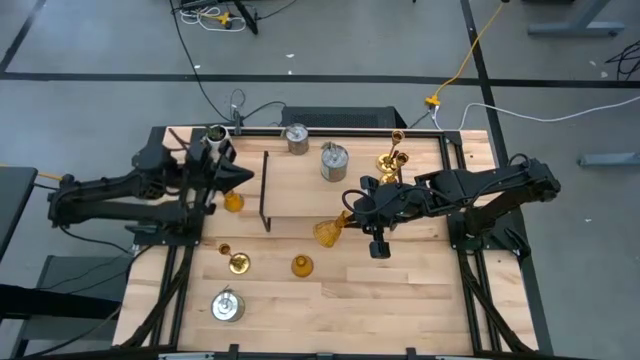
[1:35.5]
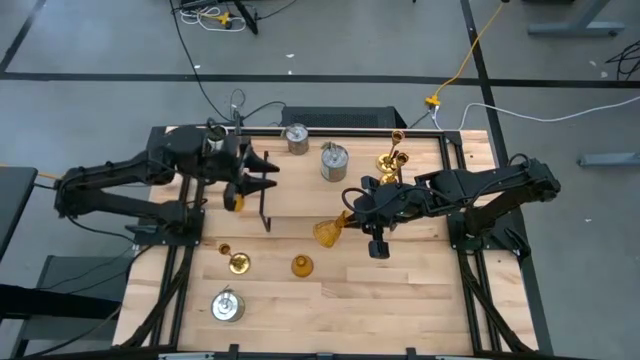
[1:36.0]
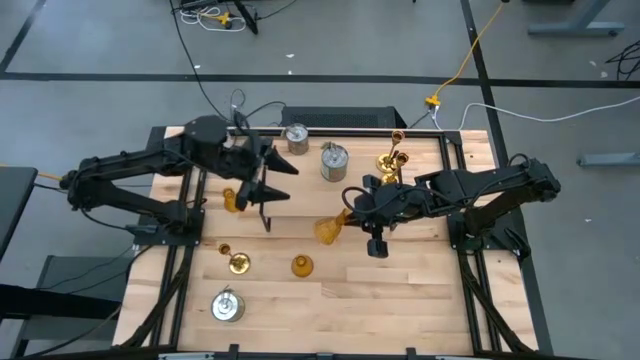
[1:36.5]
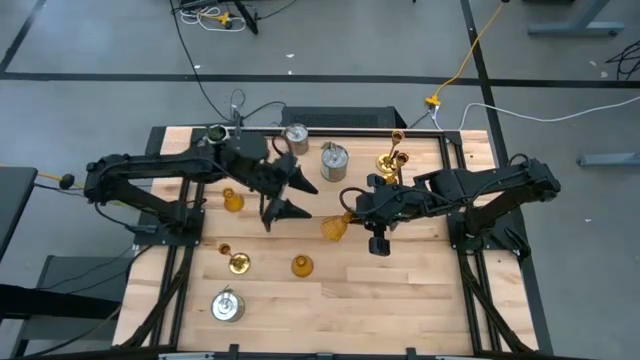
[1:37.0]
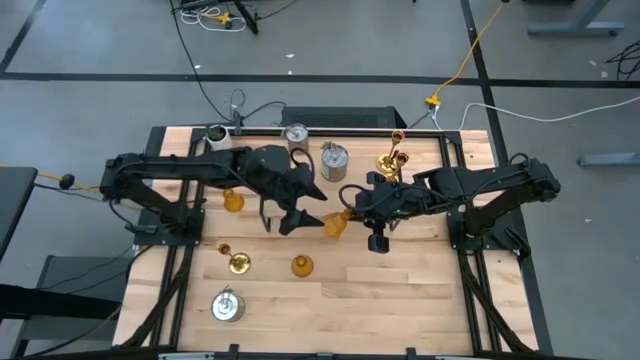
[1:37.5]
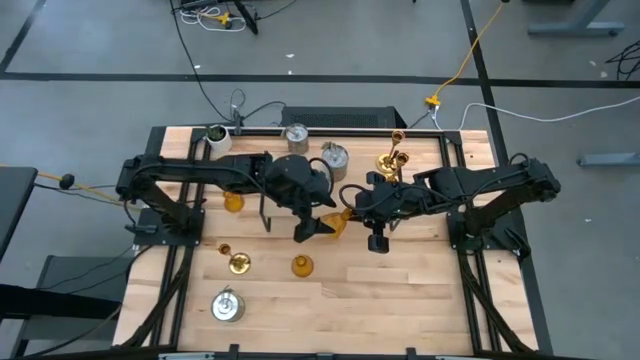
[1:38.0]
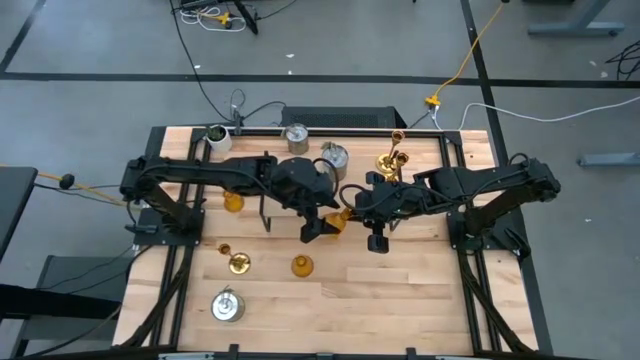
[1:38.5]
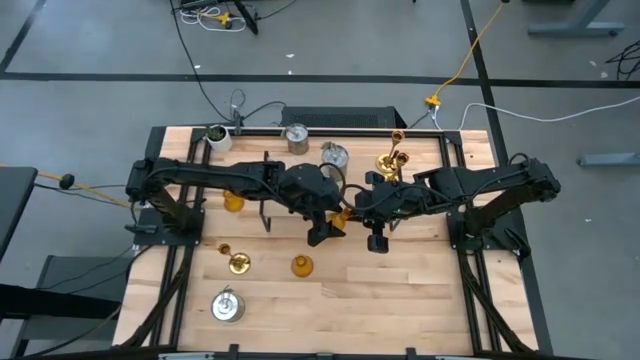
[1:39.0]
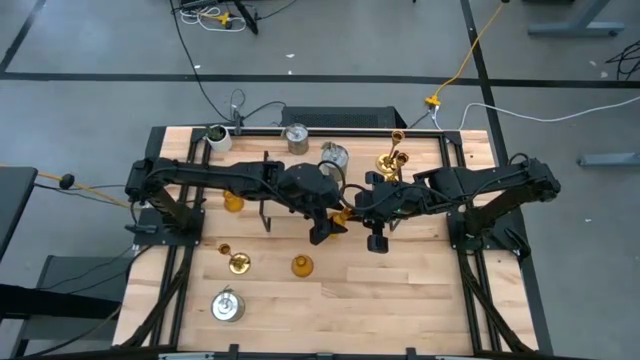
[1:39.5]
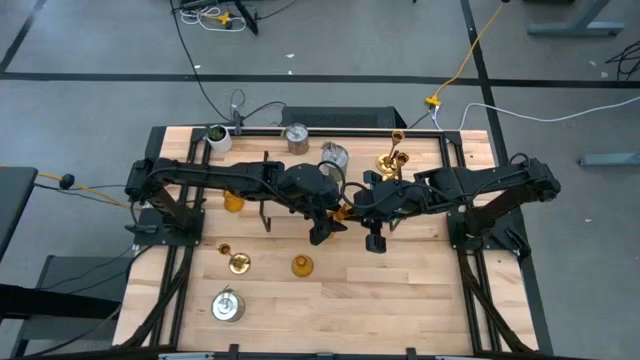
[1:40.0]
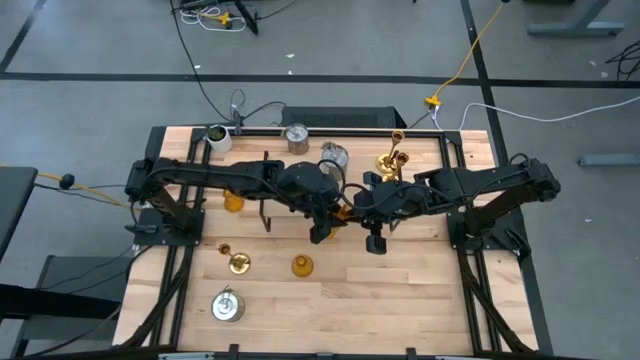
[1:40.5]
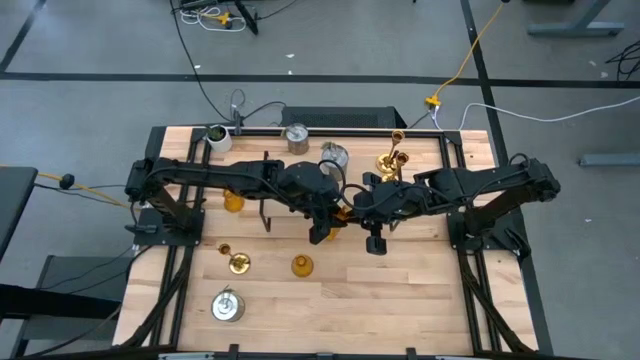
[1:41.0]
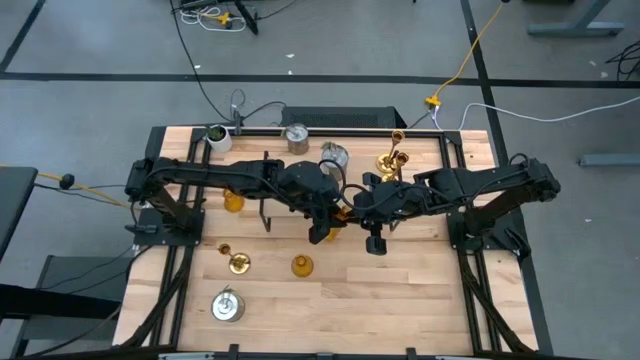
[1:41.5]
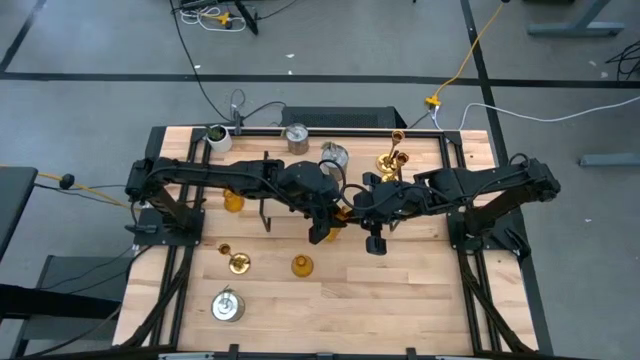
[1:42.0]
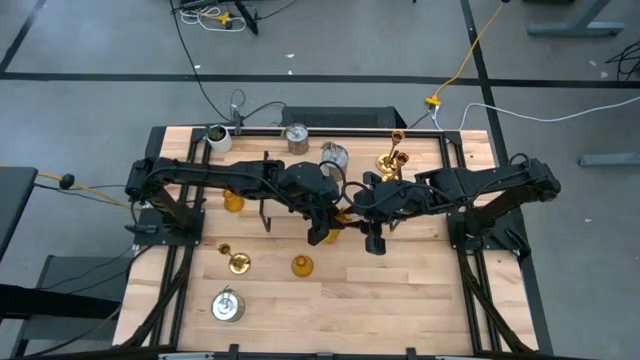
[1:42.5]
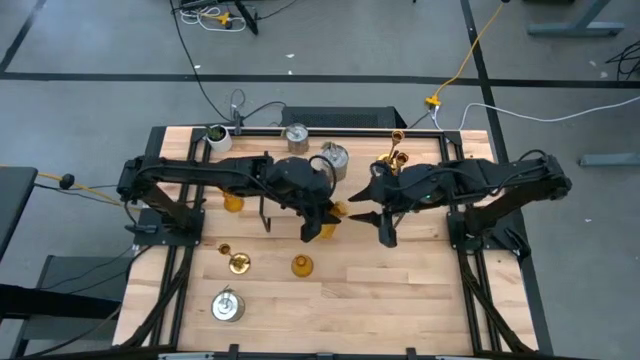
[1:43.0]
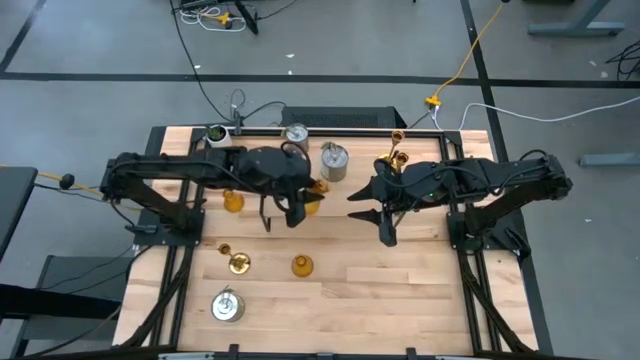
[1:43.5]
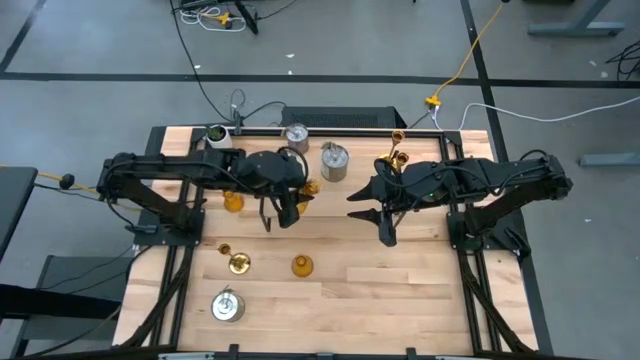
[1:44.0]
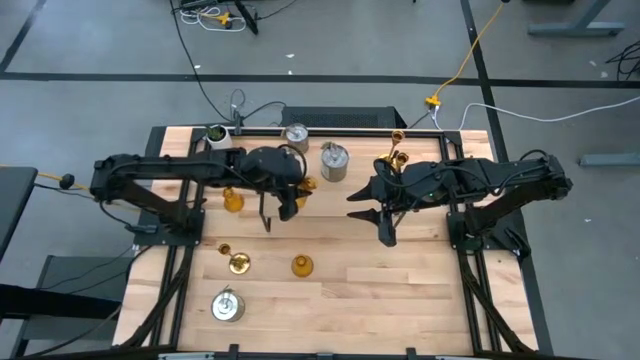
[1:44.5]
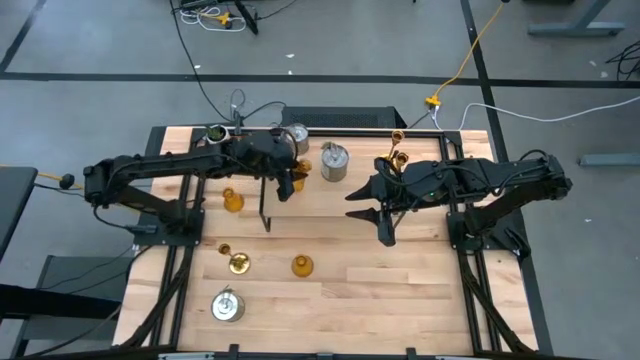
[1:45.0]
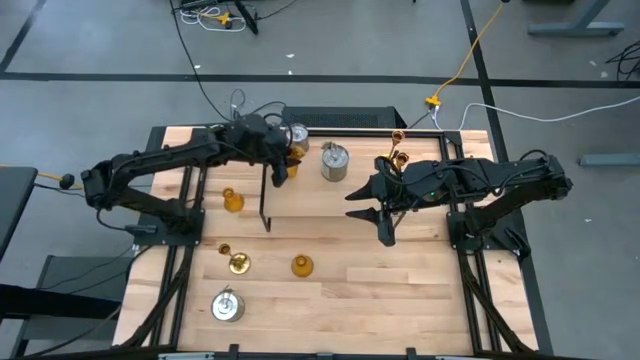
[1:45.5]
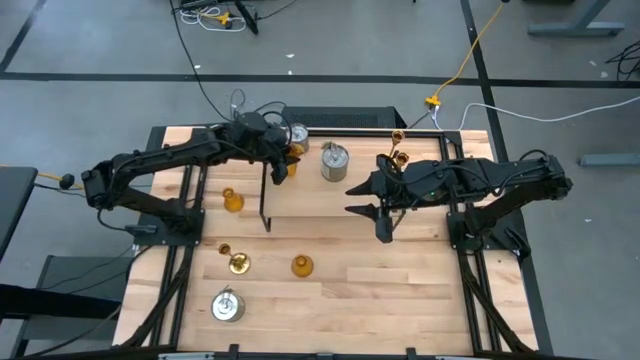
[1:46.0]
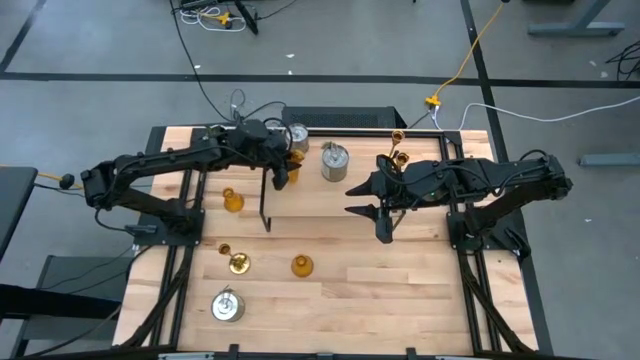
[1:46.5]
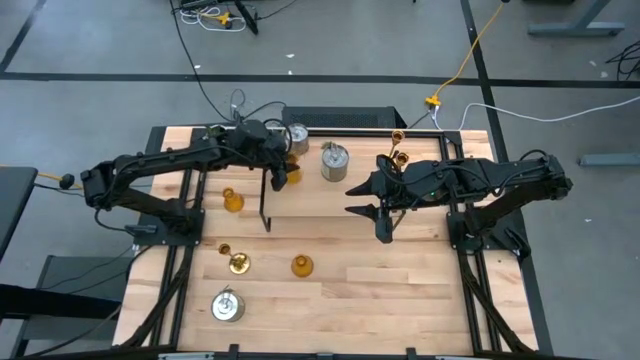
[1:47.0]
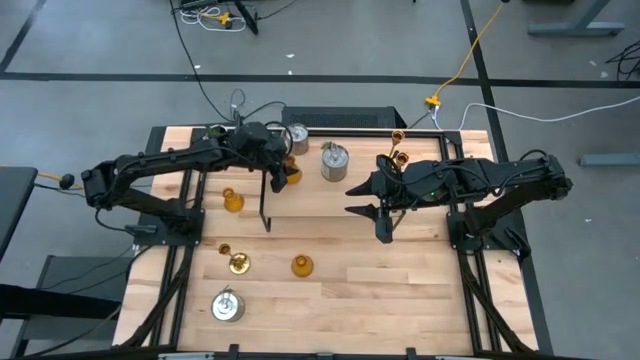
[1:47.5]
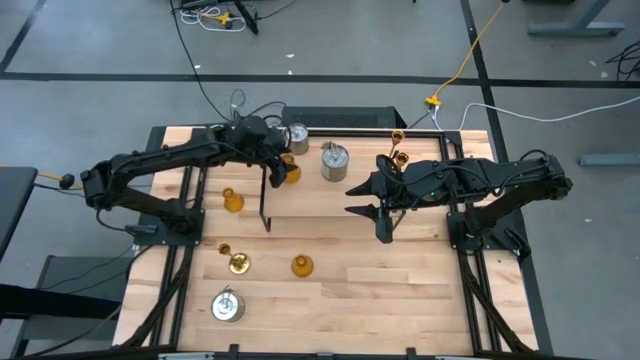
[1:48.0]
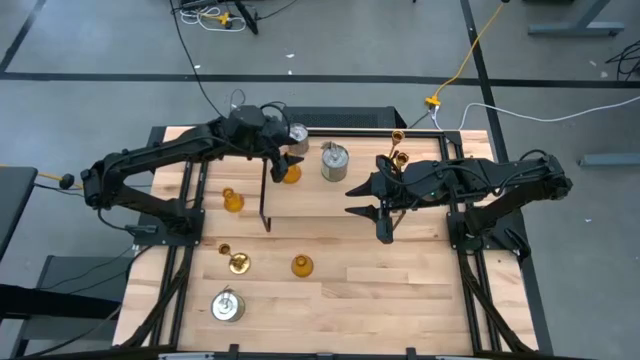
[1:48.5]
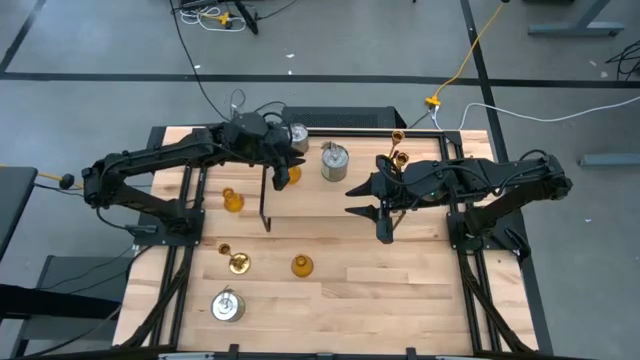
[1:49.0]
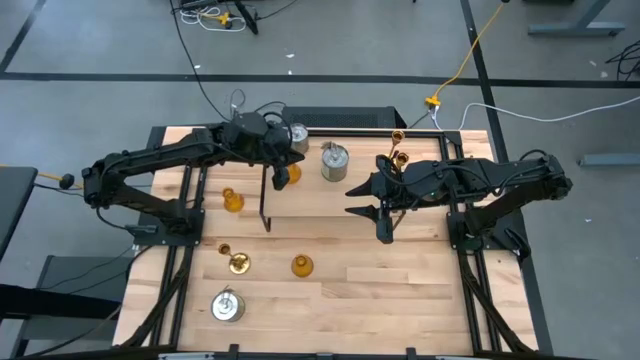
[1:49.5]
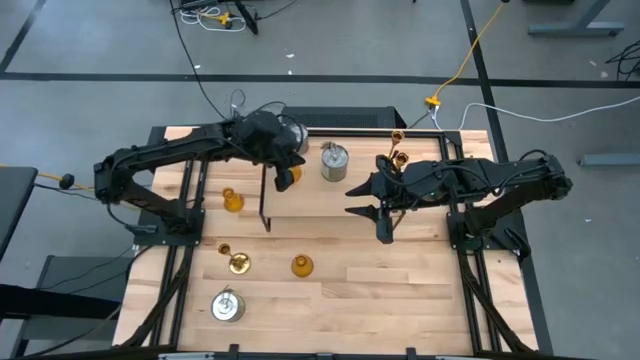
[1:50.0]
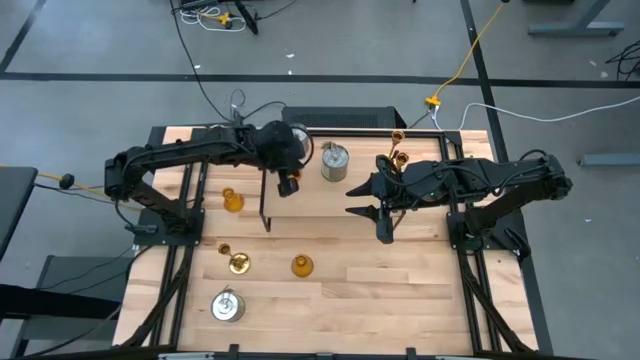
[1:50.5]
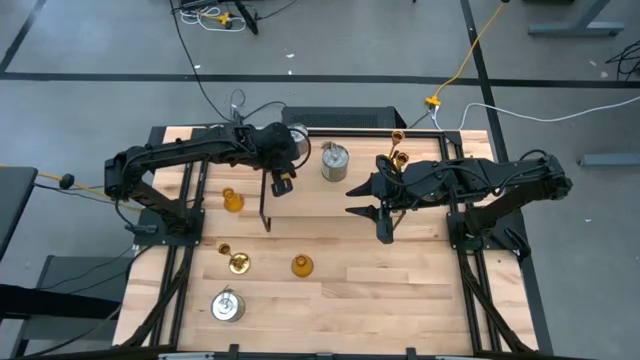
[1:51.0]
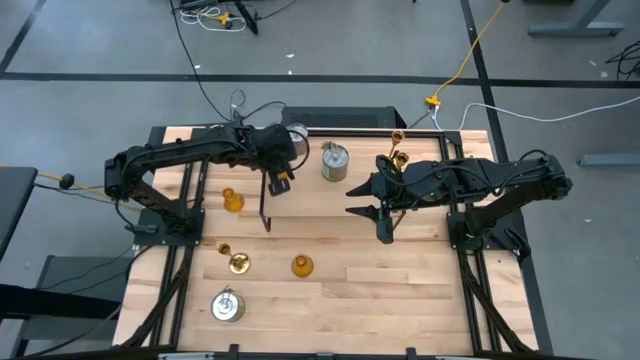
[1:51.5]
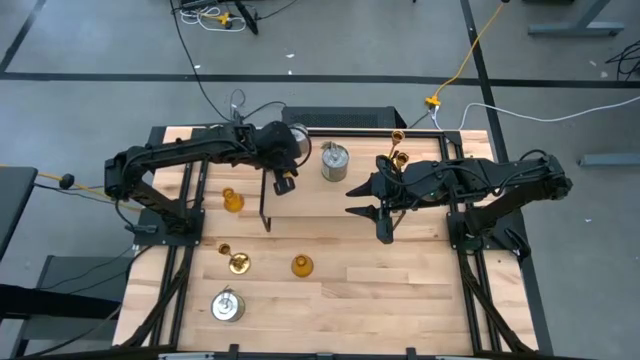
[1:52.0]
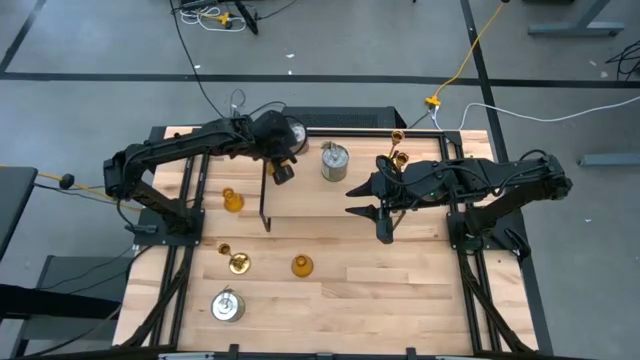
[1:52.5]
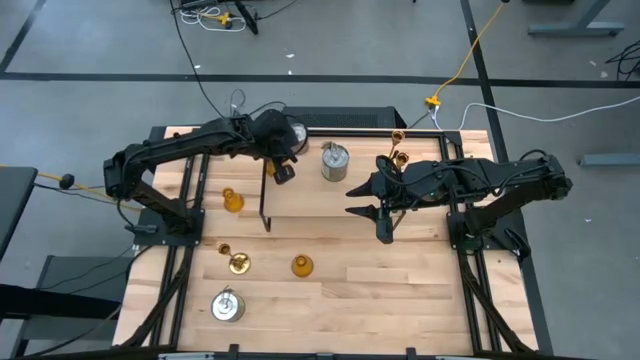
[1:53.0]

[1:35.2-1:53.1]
Task: Pick & Place candle stick holders
Put the top glass candle holder on the shelf

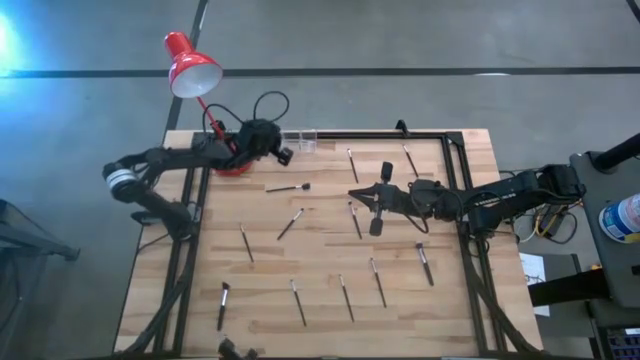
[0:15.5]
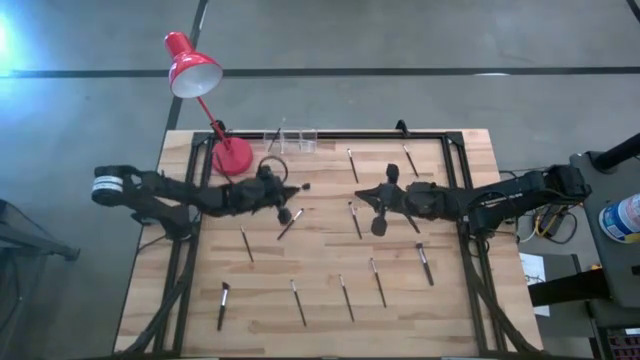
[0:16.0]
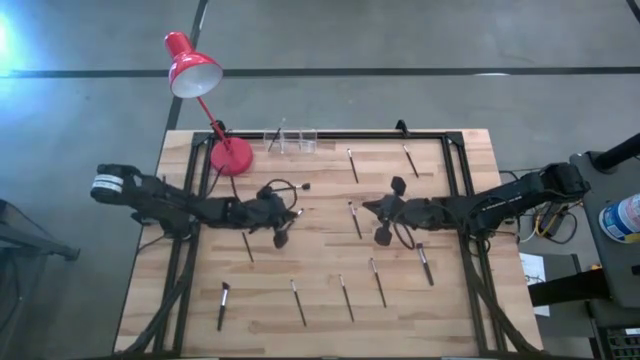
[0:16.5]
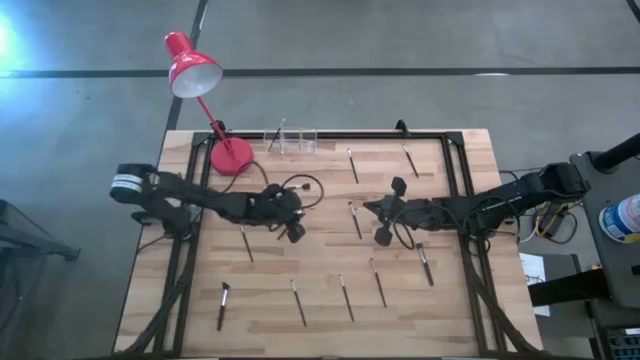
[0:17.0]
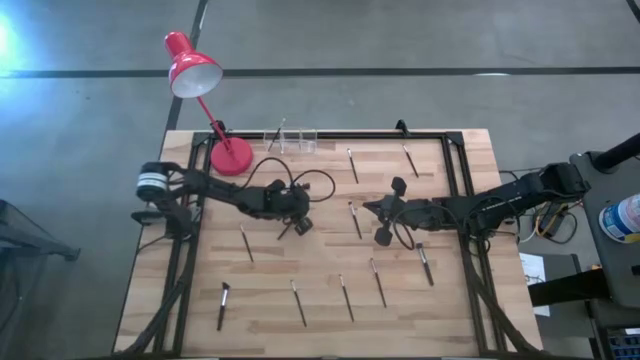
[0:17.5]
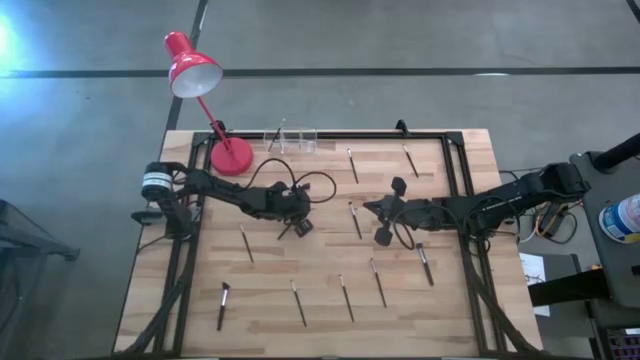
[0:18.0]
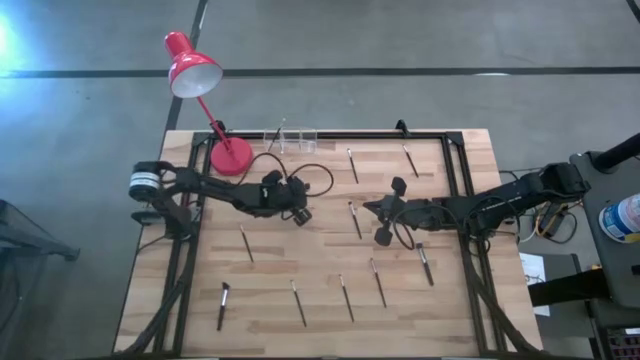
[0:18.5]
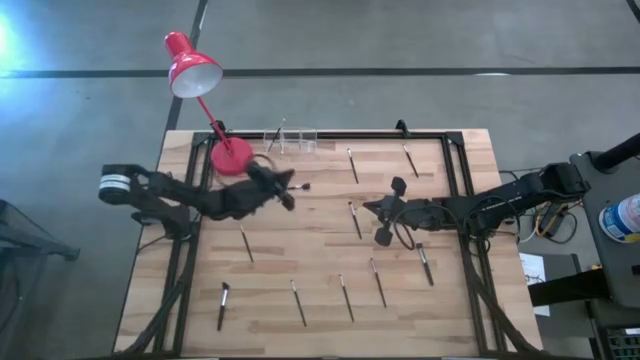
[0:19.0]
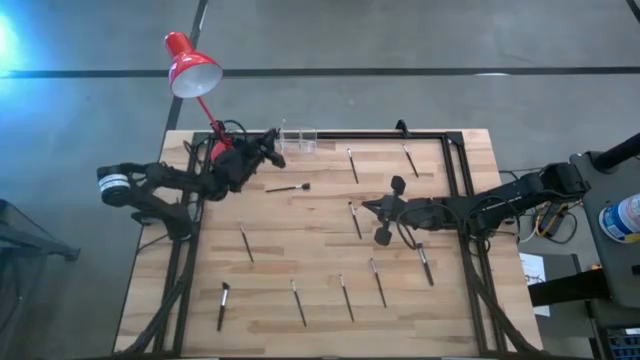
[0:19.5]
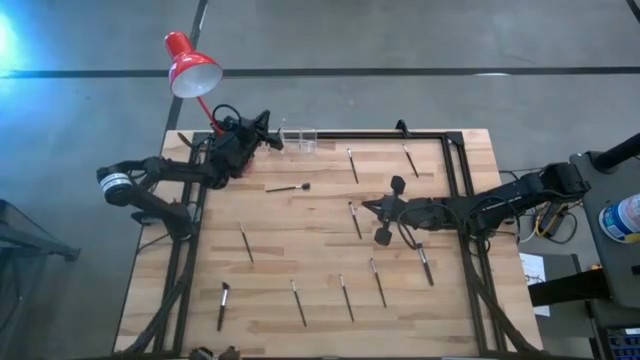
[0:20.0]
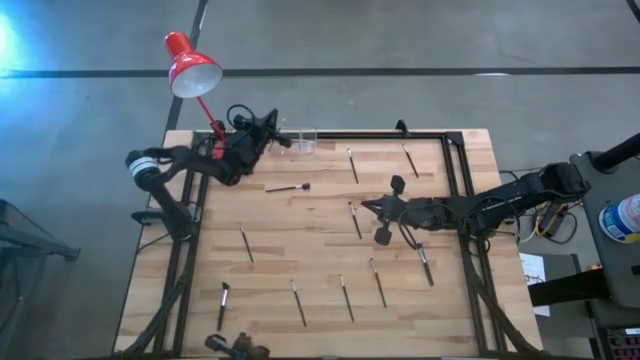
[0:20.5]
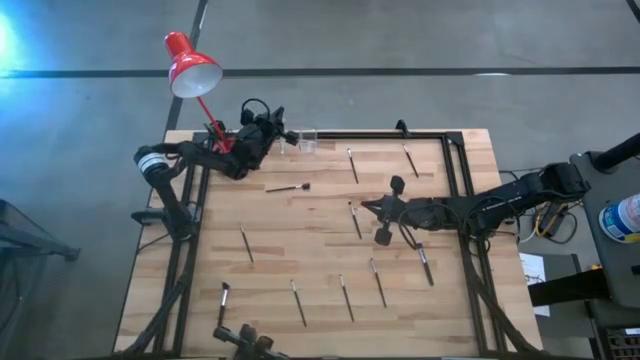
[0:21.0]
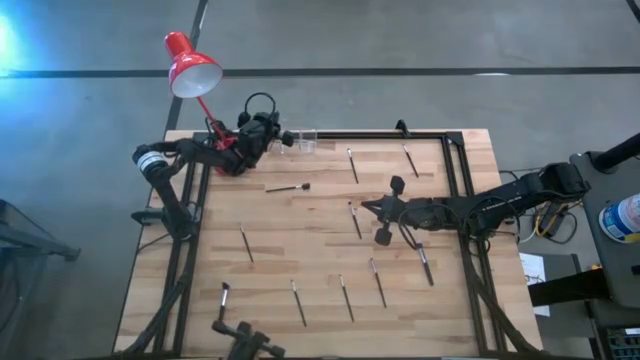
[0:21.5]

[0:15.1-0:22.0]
Task: Pick & Place Makeup Supplies
Put the makeup brush into the transparent organizer
